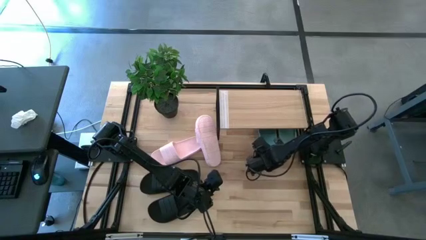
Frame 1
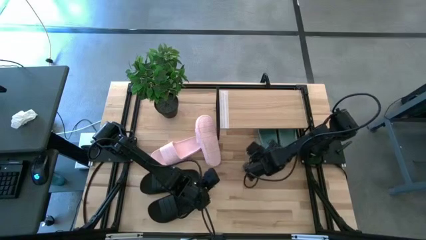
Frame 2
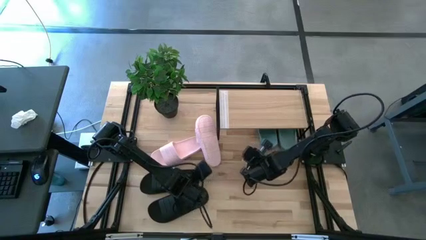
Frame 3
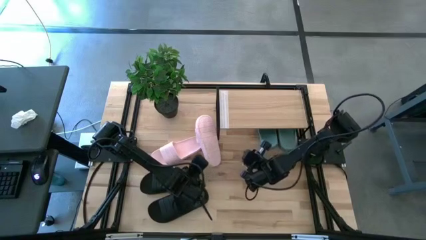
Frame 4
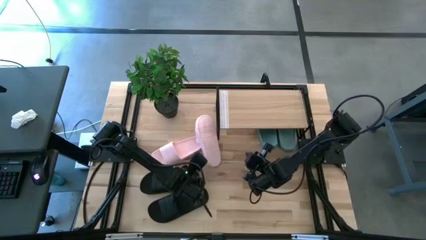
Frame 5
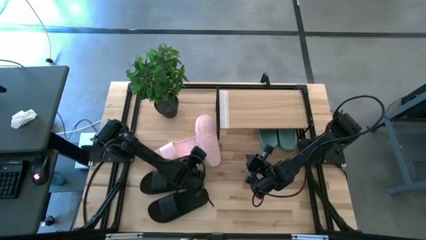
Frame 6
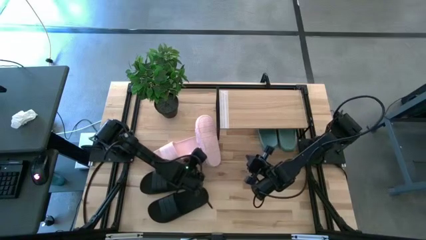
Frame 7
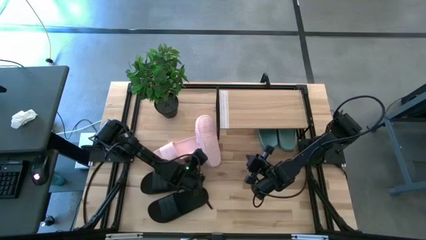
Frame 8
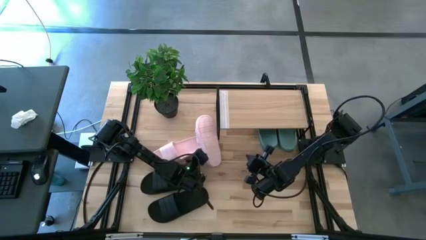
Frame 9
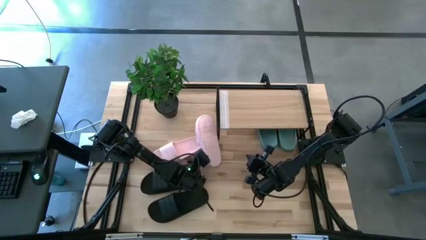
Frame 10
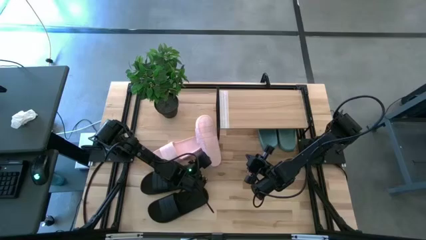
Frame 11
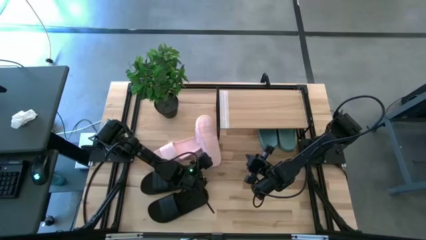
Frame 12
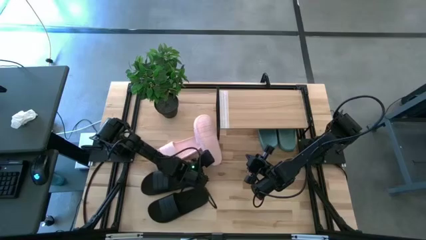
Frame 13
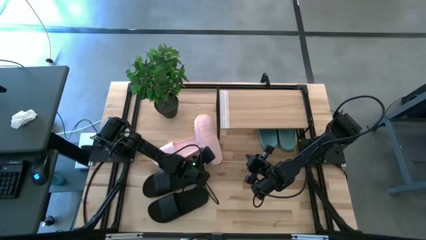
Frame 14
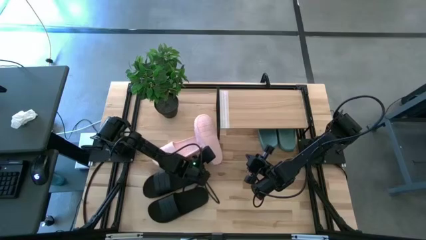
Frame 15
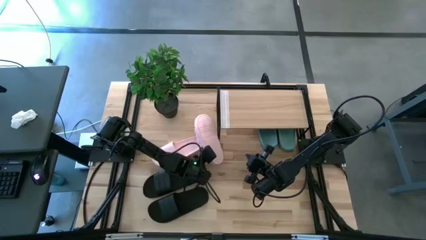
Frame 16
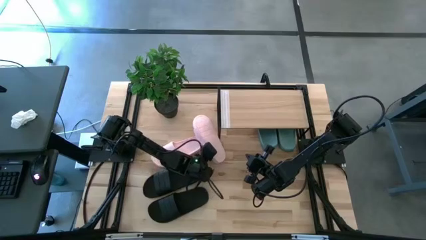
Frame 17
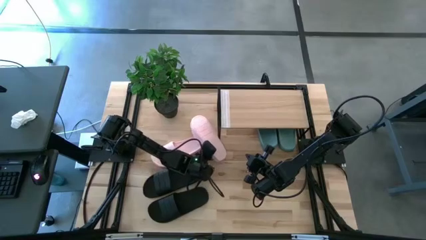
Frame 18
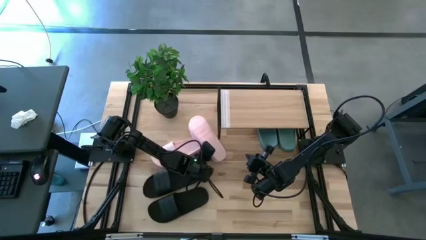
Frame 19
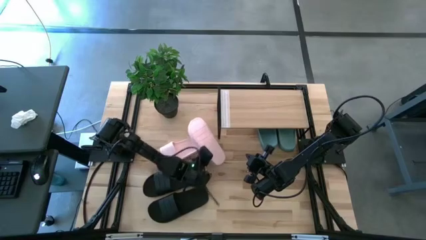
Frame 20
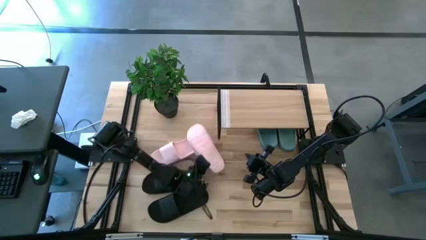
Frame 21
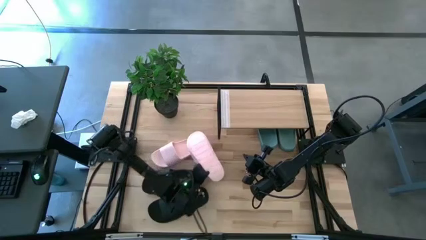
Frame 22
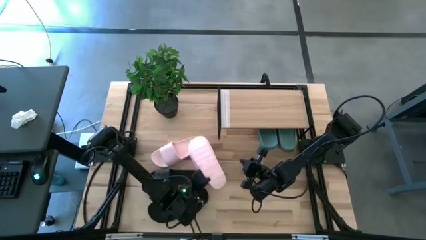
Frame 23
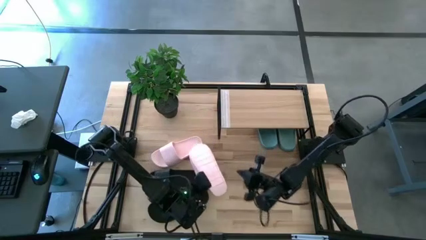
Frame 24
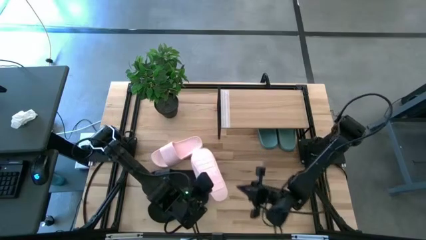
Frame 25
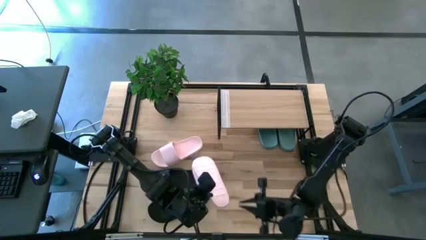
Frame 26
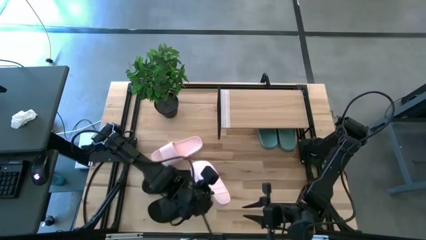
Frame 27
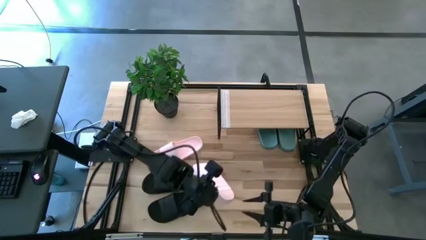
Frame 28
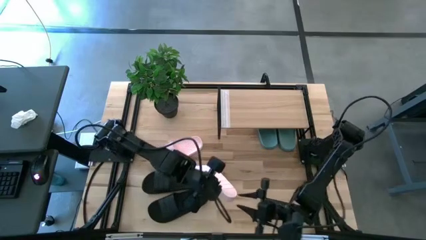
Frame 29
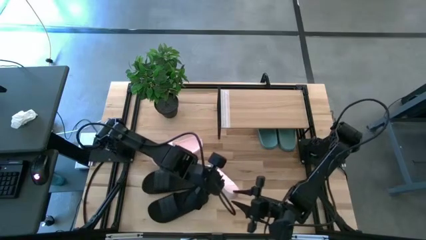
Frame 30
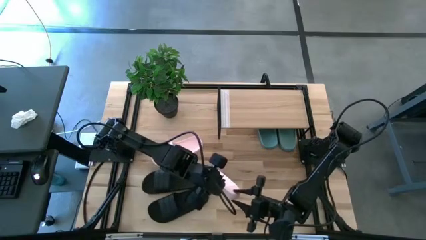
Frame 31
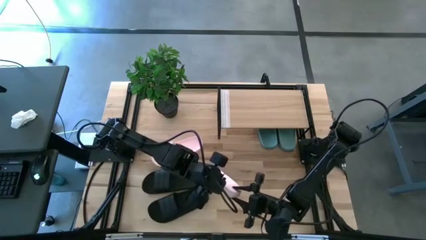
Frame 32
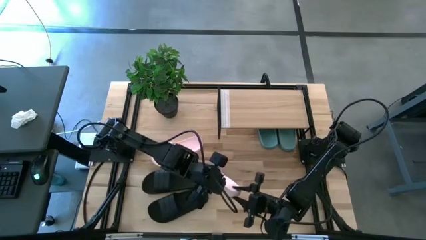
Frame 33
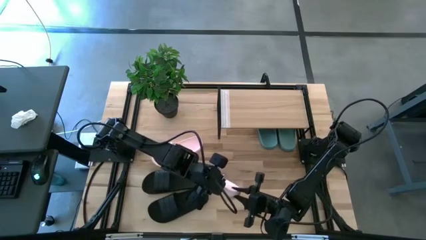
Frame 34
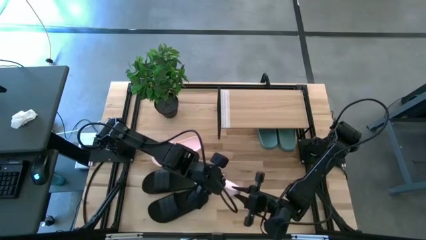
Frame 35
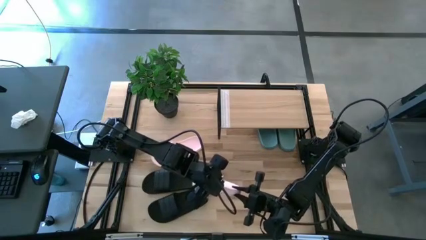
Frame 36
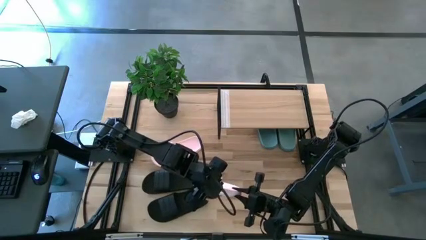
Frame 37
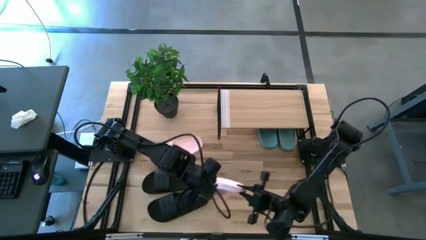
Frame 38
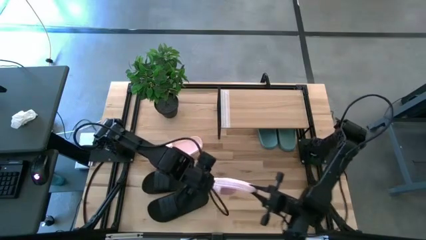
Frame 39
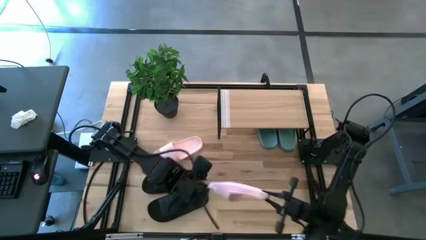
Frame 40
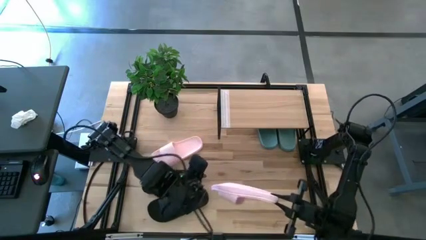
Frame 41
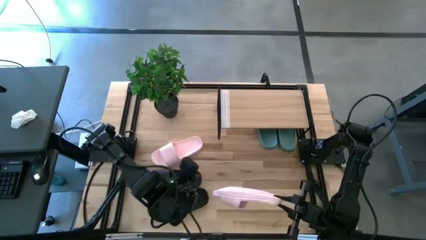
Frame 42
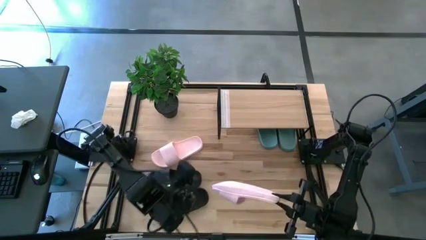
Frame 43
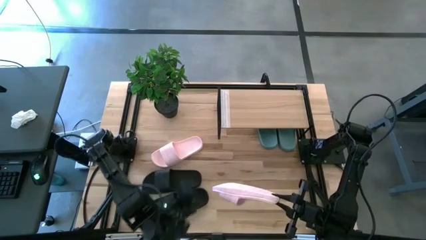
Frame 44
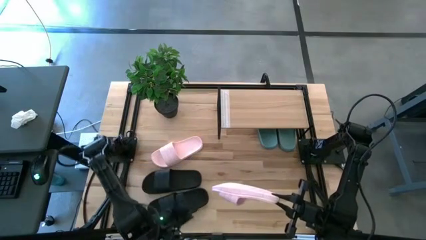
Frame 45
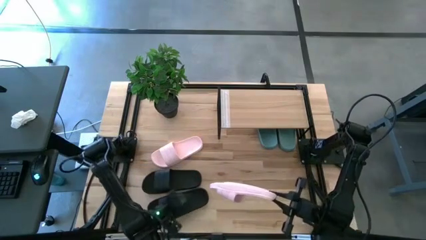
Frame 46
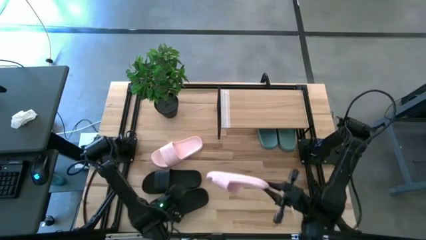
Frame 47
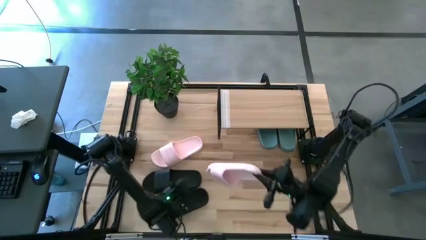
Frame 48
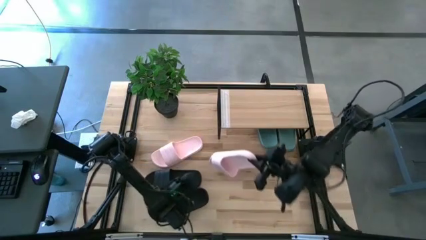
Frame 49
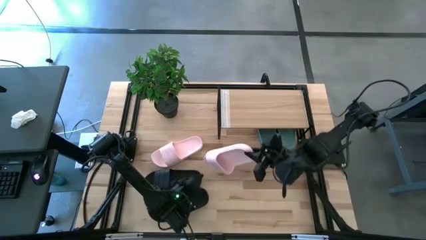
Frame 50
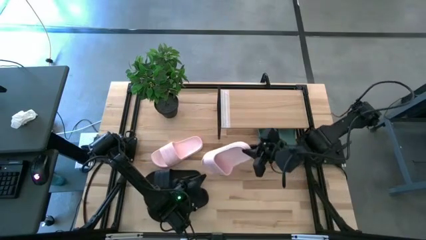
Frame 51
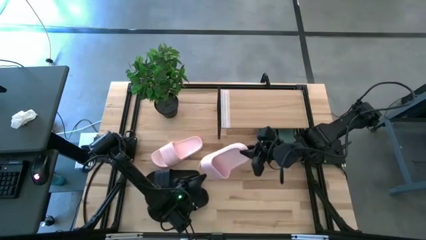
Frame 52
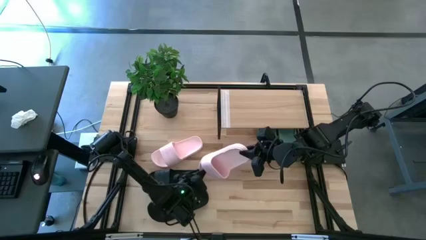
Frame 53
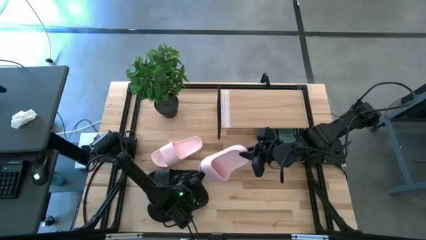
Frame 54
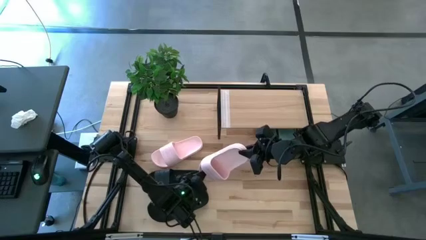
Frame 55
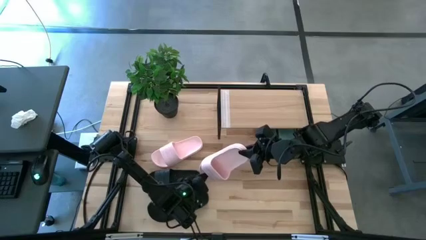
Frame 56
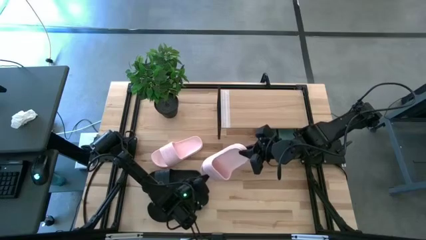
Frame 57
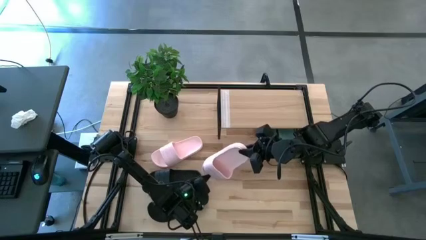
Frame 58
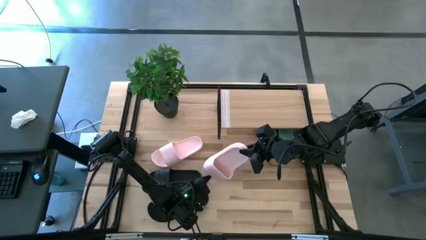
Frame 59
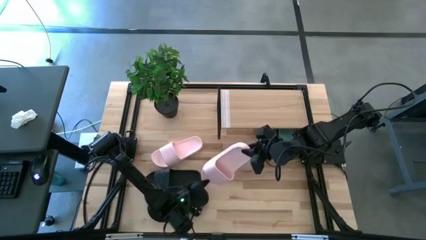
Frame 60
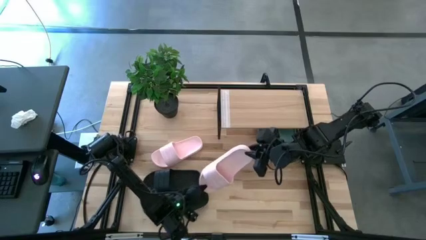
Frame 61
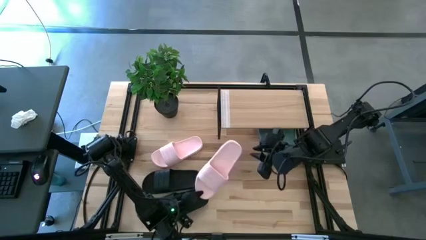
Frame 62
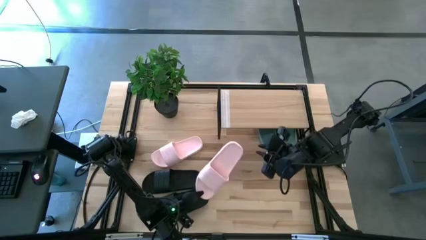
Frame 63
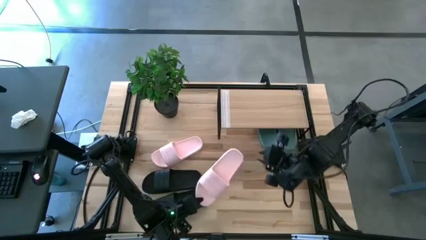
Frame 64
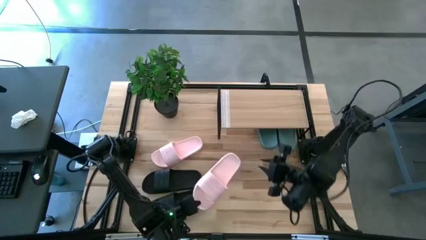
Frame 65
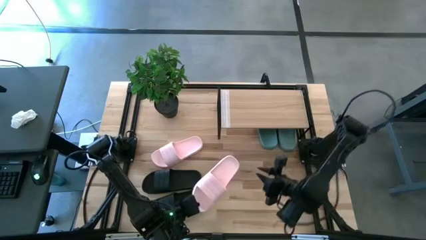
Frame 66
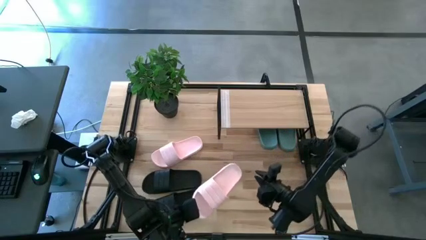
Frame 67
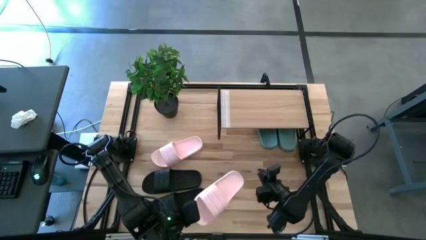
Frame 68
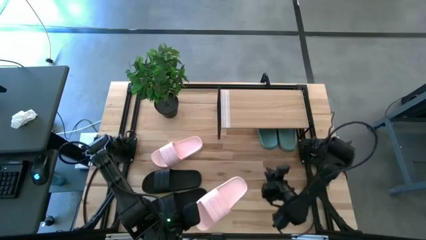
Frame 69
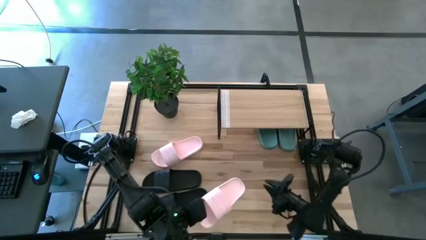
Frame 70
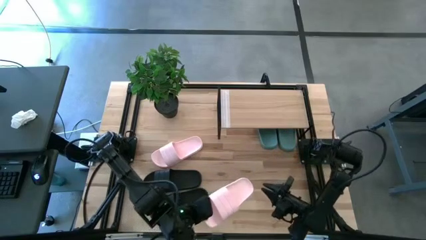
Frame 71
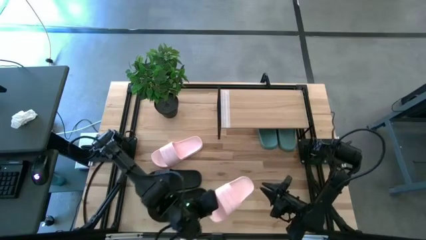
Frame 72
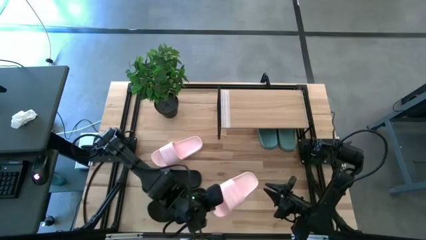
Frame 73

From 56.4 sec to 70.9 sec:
Task: Pick and place slides into the shelf
Put the right pink slide under the shelf
